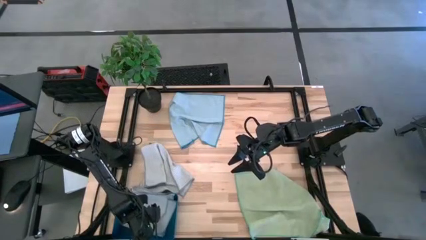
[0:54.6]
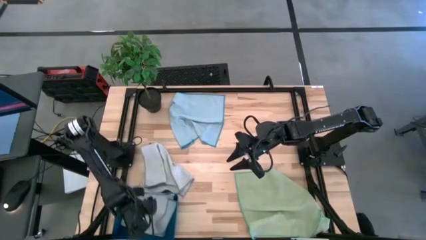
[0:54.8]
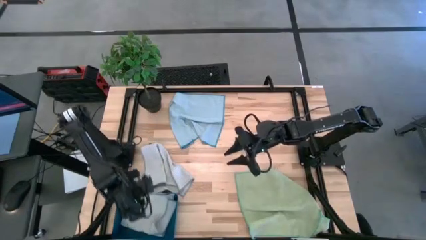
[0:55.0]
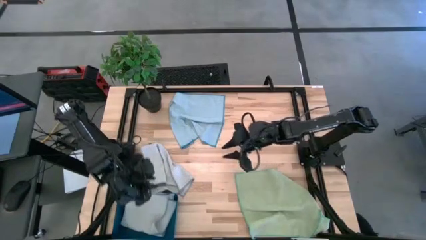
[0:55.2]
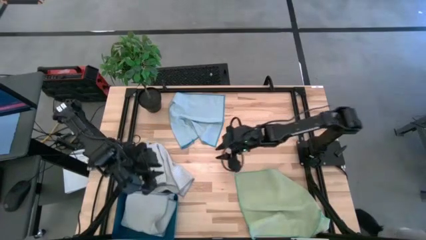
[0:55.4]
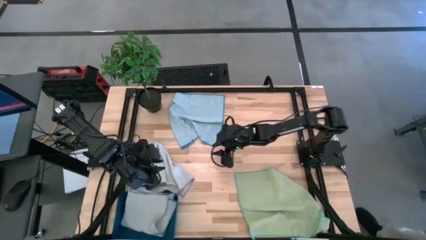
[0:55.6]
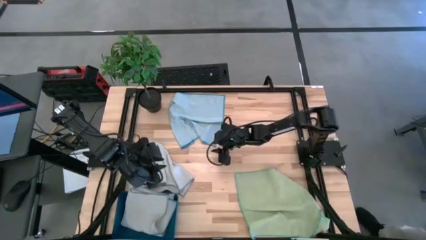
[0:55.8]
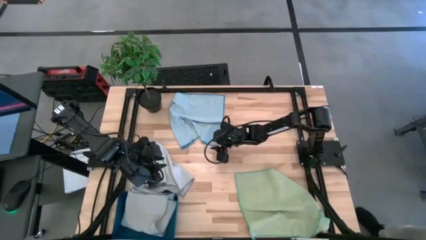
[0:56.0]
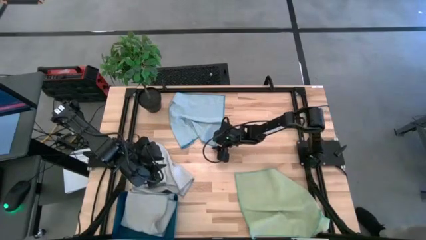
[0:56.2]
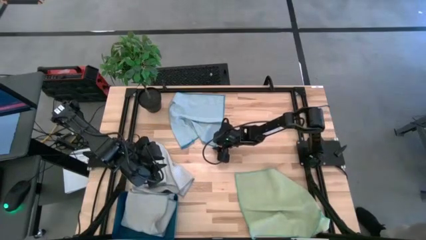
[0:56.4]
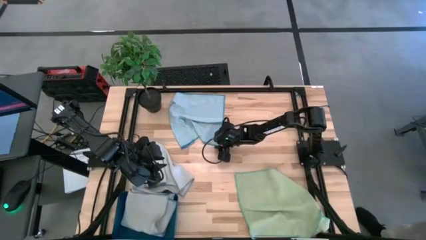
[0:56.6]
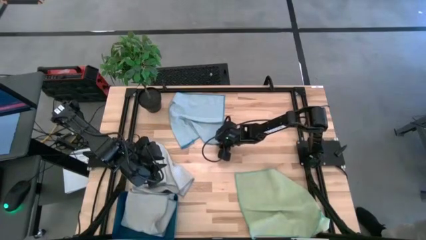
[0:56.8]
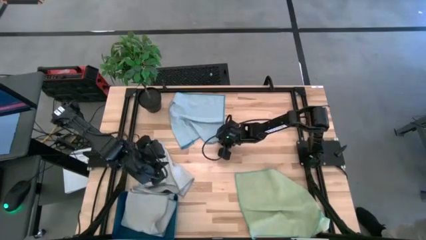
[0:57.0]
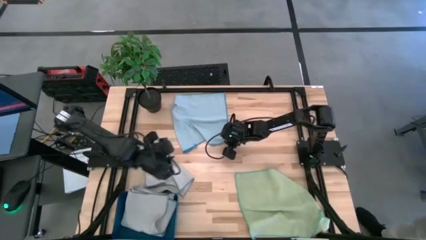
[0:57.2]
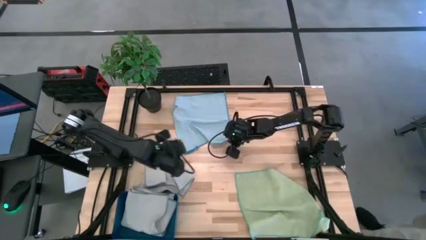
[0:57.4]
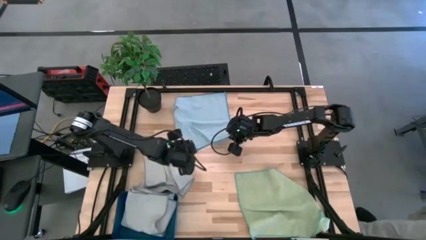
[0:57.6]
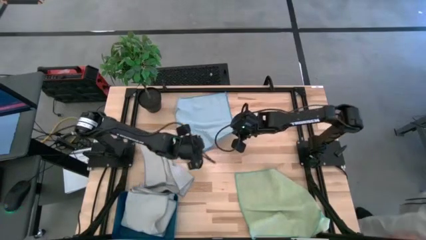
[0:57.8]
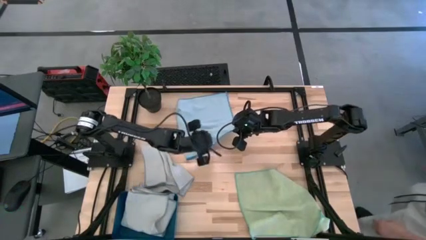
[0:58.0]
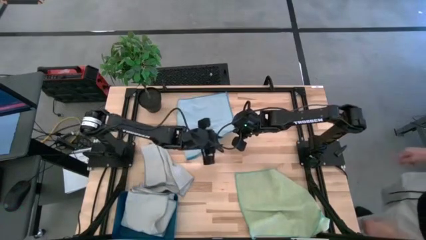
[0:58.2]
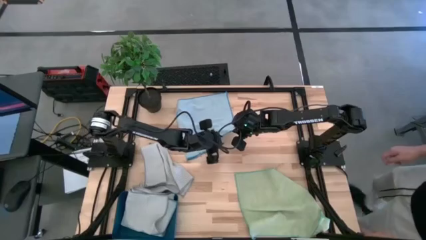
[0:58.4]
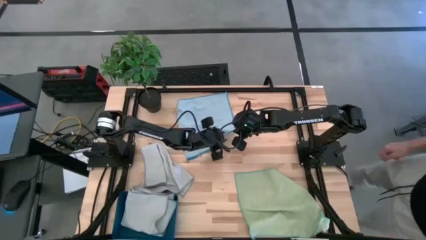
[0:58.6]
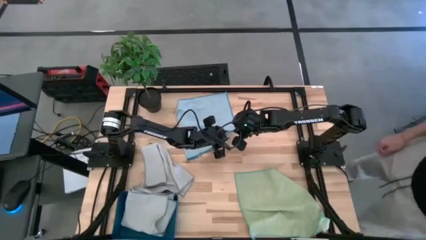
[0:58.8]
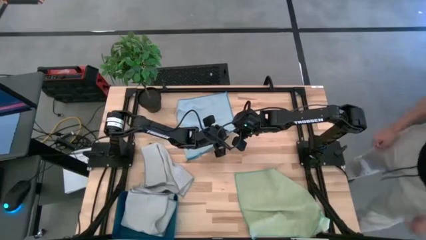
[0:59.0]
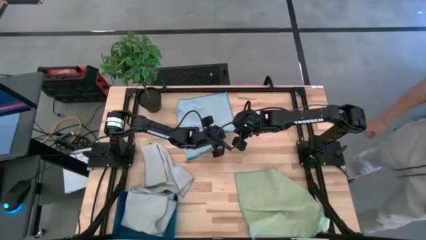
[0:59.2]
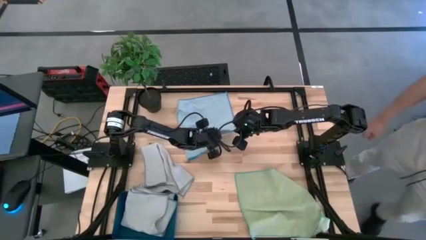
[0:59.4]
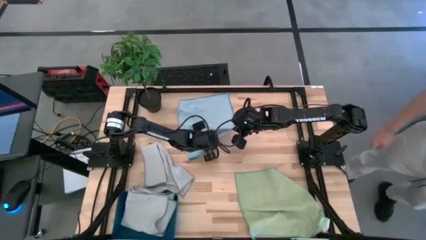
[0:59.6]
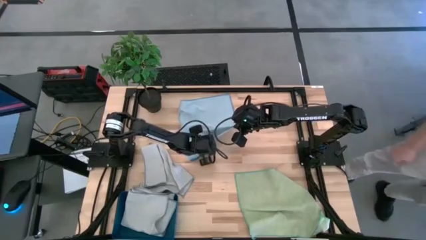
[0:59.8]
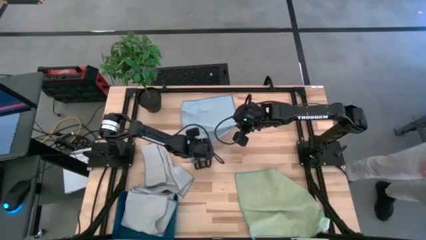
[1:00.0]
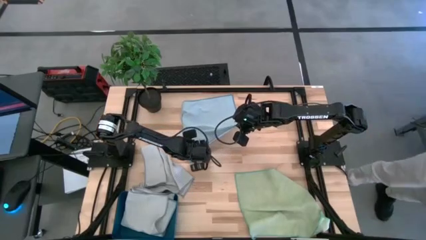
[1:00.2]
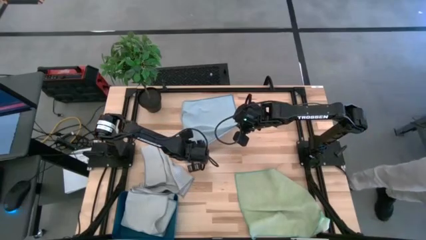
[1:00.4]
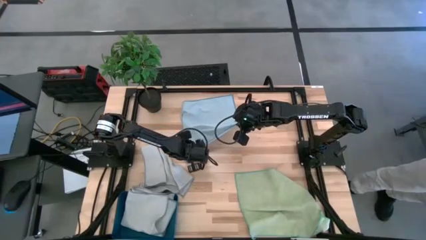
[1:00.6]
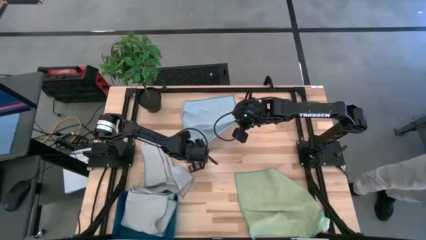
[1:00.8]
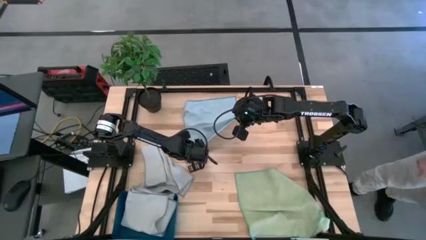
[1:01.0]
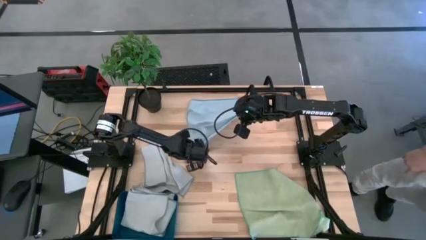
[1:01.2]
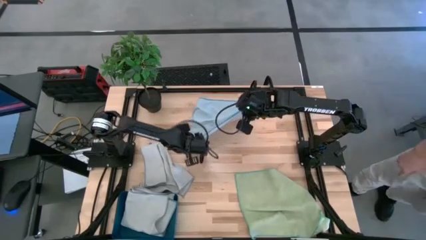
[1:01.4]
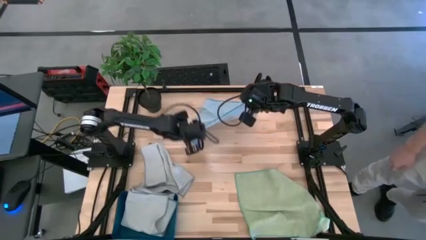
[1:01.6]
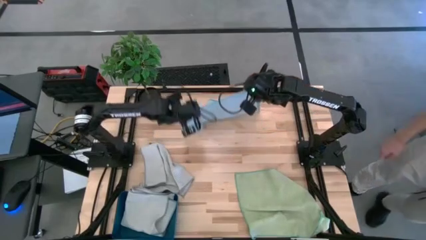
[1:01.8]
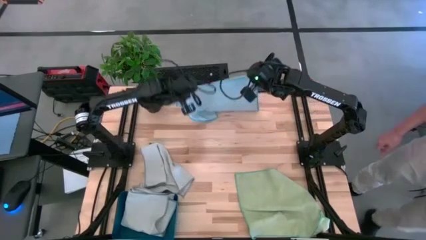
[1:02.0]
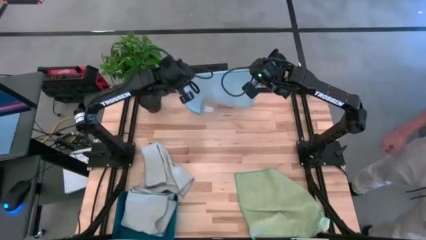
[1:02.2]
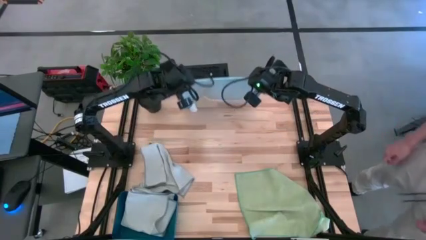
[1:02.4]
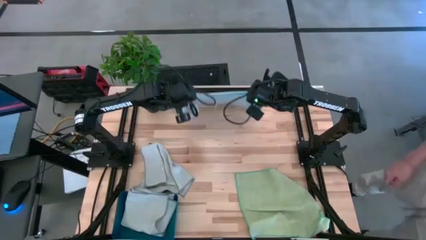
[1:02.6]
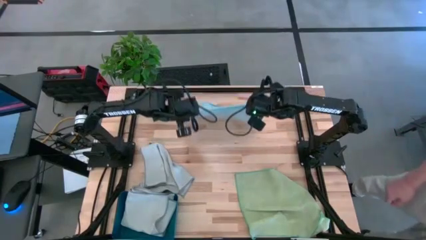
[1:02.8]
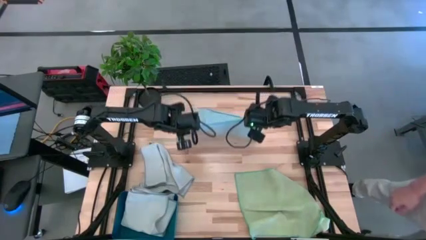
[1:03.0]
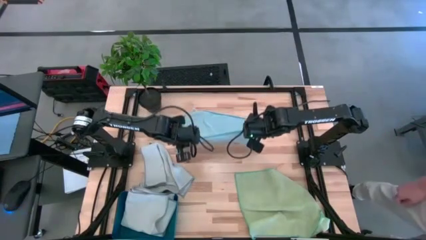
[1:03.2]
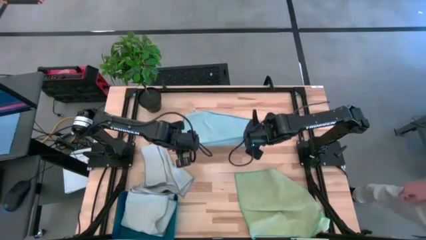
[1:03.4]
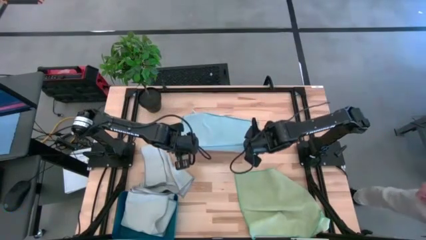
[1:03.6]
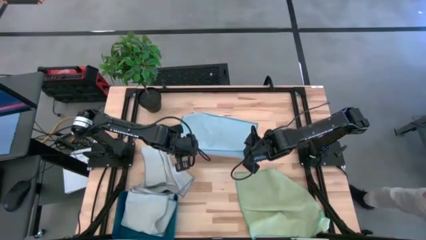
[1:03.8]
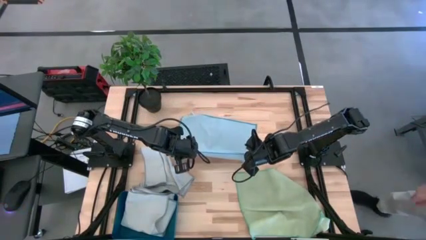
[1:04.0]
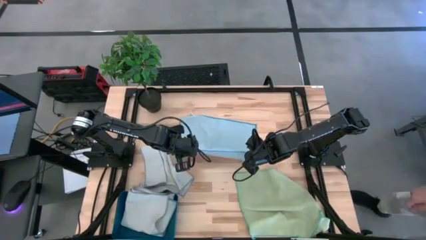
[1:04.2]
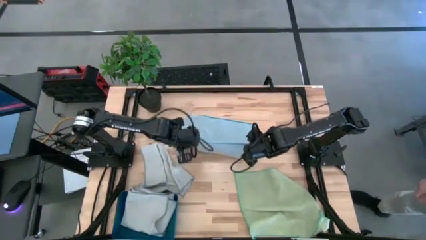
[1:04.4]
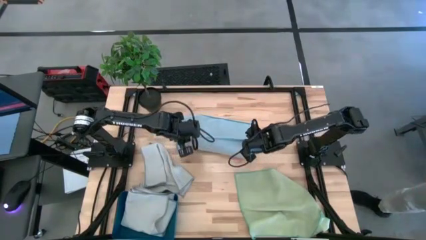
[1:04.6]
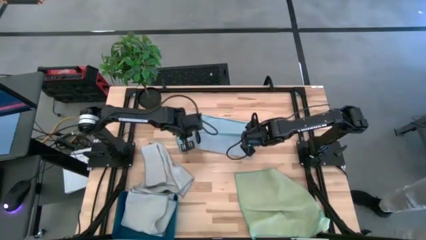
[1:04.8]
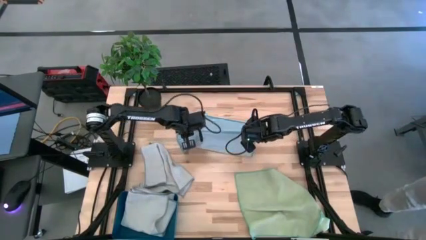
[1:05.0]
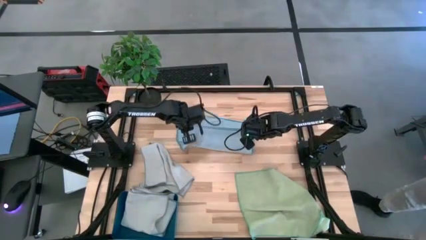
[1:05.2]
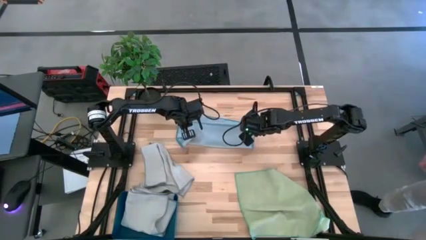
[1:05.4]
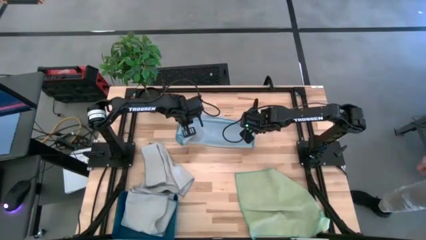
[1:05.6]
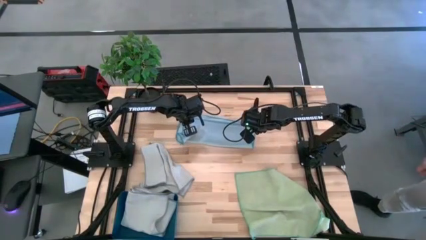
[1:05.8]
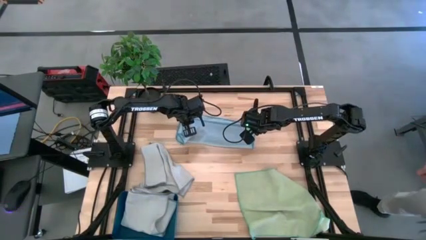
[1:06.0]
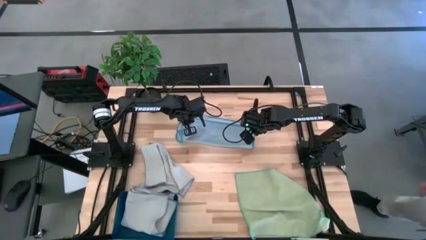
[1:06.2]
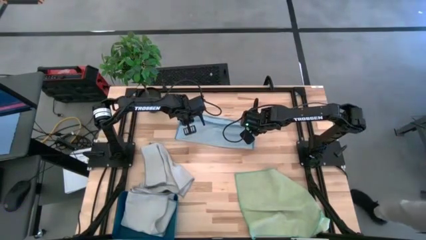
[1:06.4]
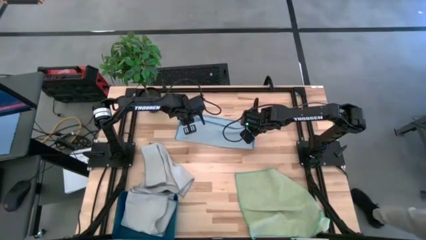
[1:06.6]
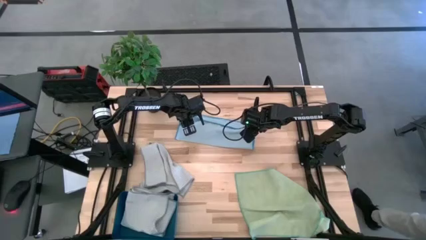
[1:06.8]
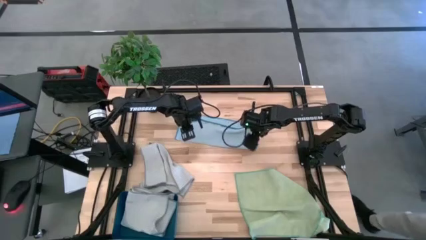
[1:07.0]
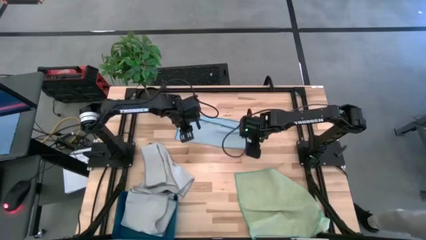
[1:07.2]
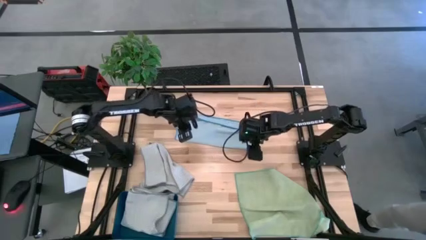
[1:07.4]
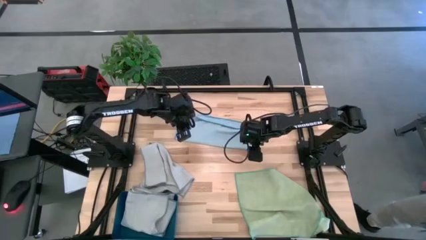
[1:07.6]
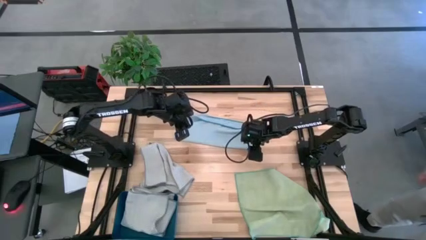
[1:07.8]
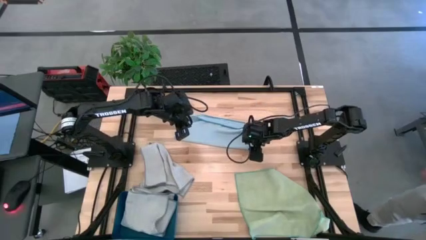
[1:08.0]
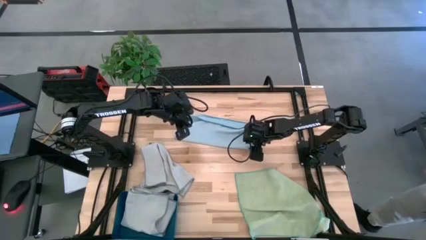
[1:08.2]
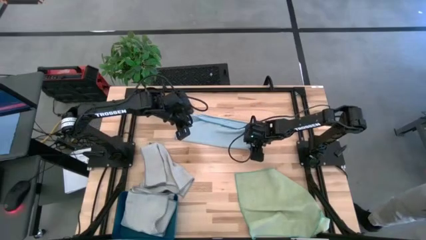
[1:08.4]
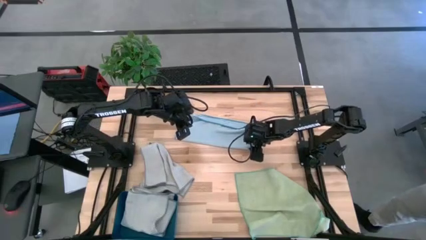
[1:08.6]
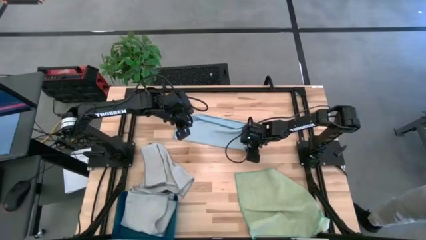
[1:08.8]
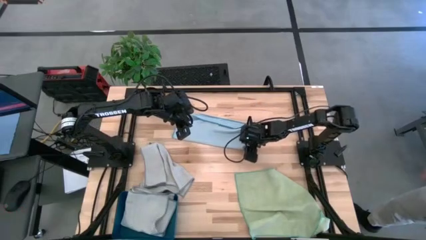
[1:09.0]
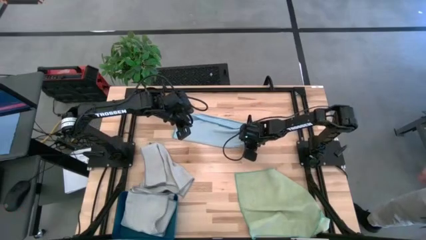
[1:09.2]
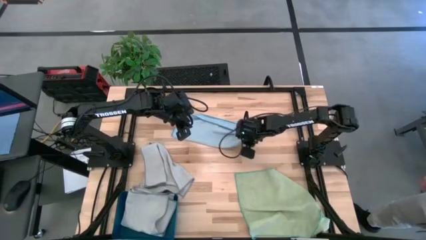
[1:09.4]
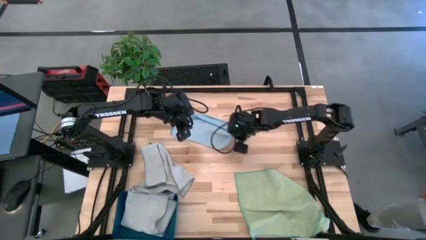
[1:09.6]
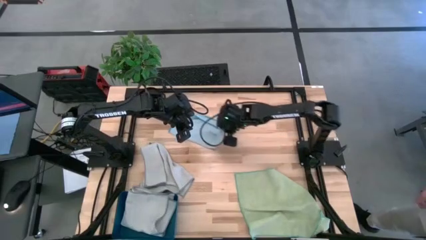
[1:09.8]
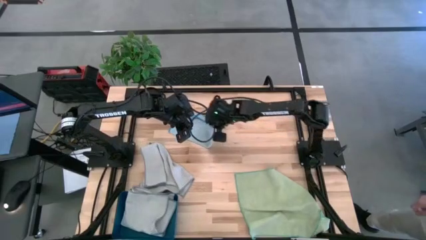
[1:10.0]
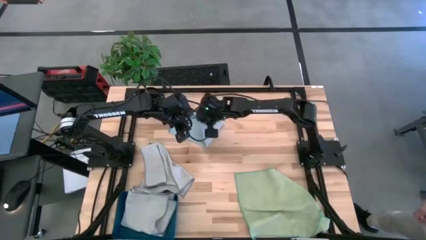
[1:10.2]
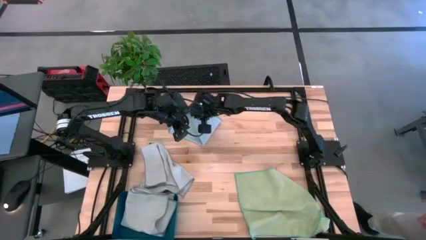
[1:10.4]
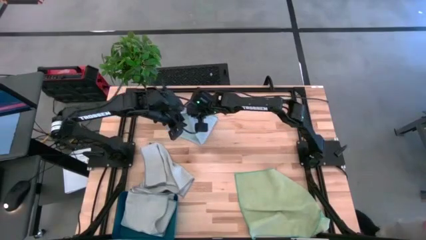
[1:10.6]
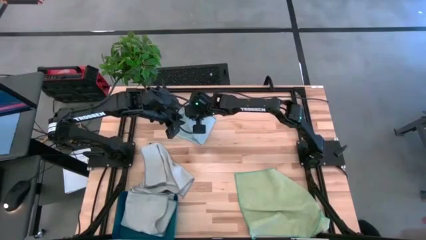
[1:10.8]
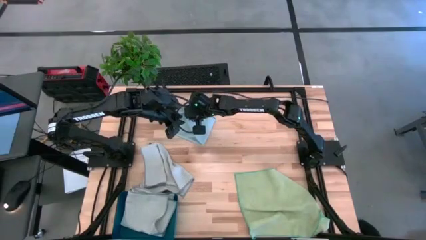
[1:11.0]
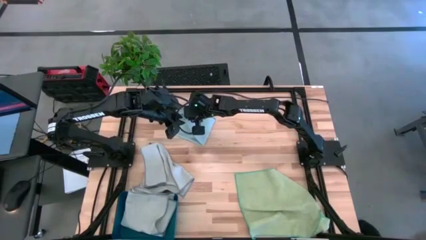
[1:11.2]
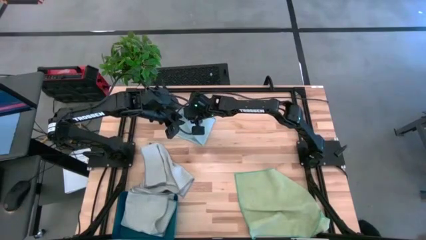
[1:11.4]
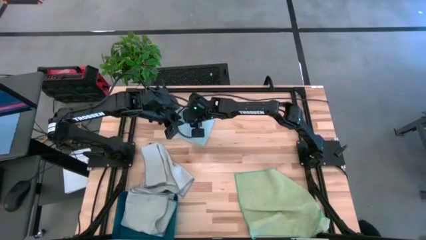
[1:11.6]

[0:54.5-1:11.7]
Task: Fold microfiber towels
Fold the blue microfiber towel
